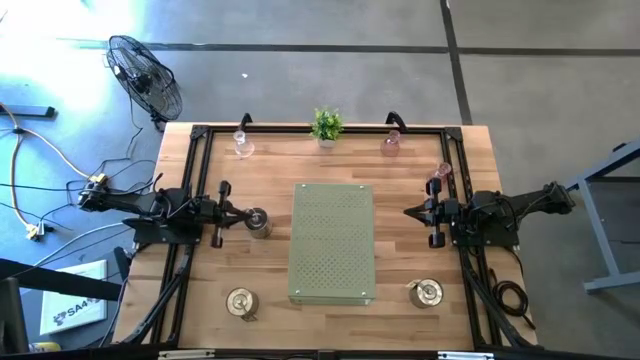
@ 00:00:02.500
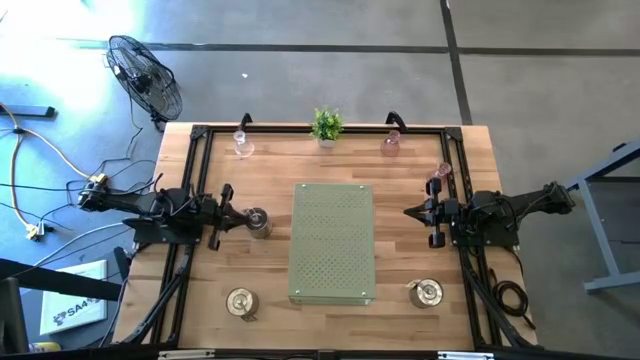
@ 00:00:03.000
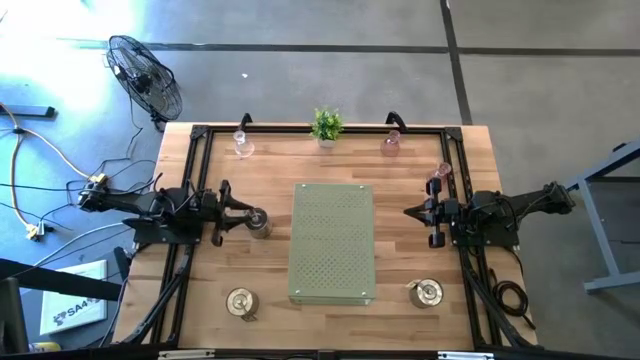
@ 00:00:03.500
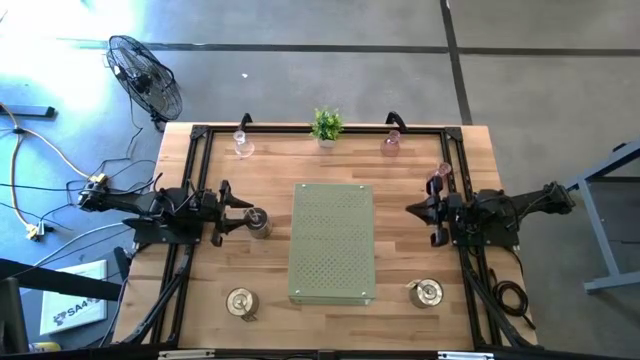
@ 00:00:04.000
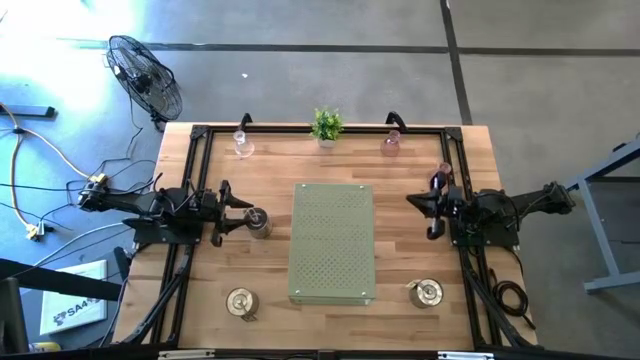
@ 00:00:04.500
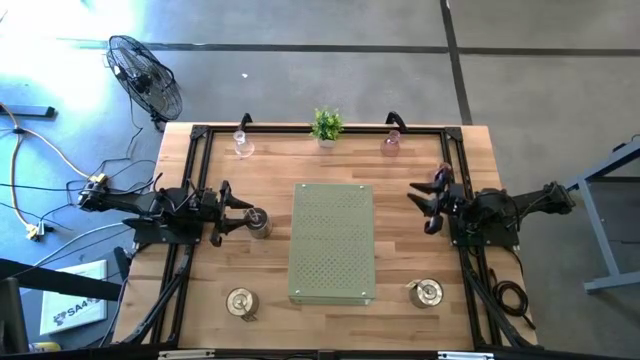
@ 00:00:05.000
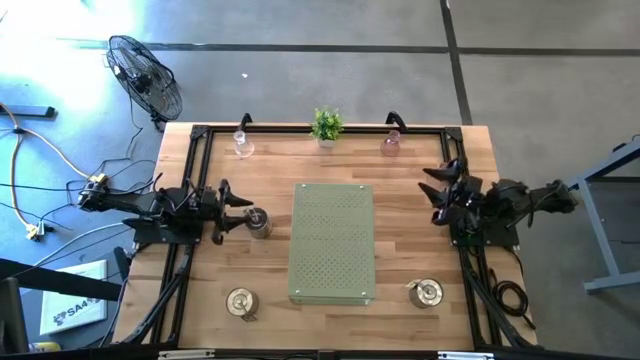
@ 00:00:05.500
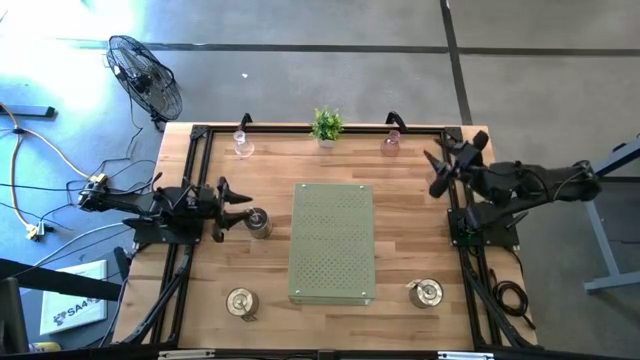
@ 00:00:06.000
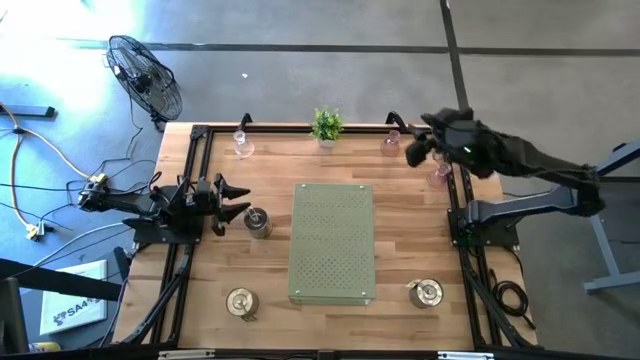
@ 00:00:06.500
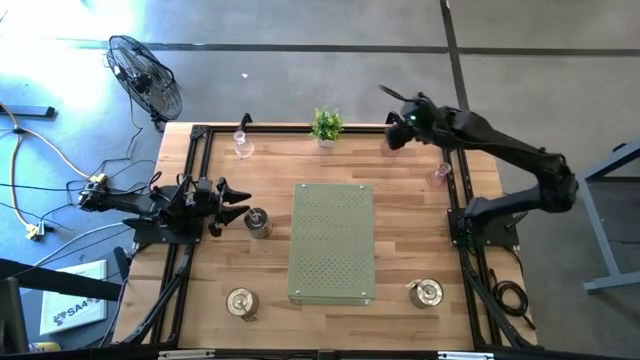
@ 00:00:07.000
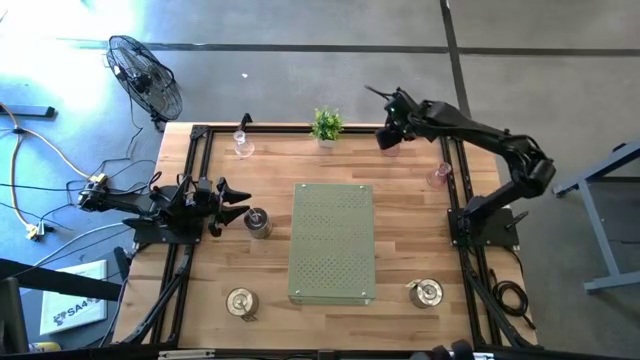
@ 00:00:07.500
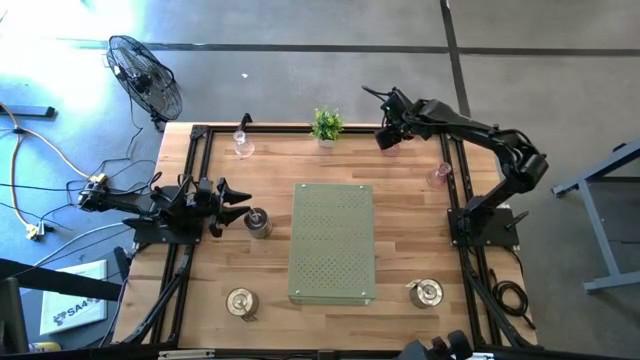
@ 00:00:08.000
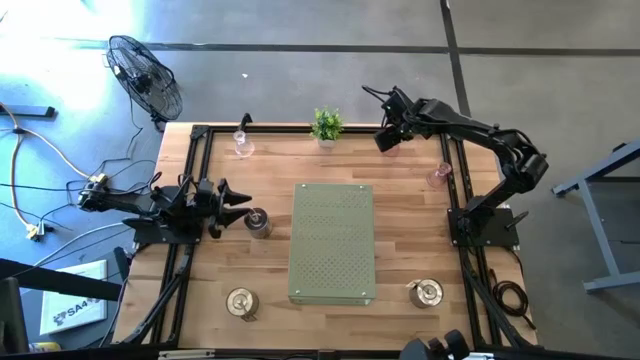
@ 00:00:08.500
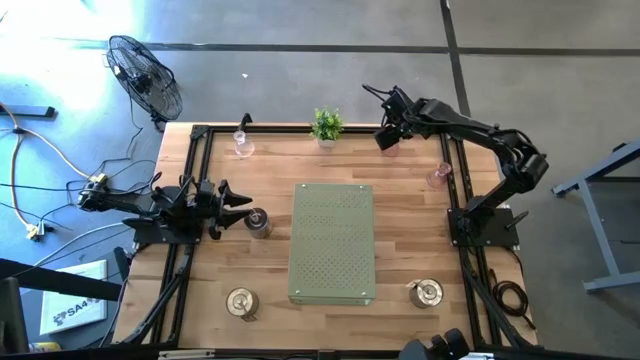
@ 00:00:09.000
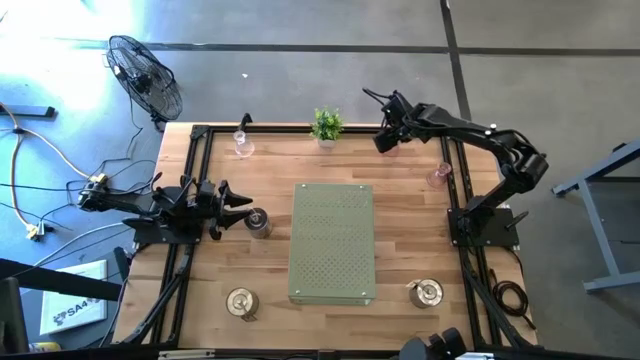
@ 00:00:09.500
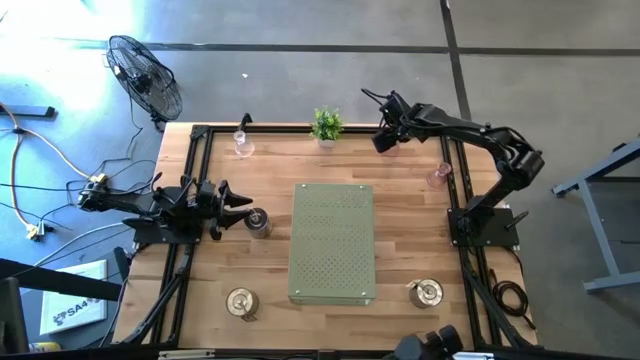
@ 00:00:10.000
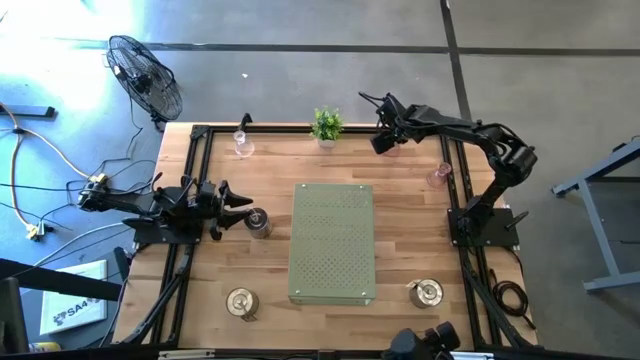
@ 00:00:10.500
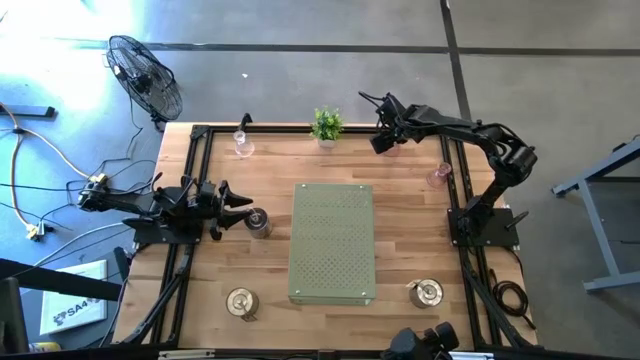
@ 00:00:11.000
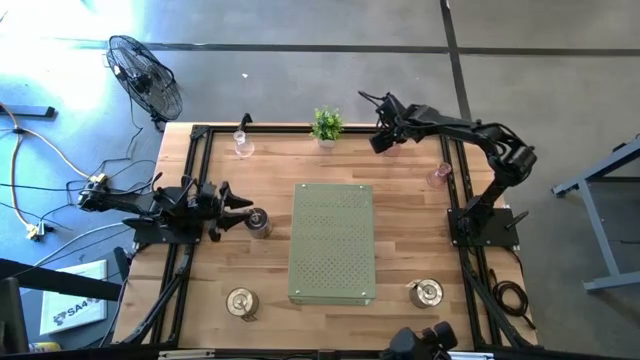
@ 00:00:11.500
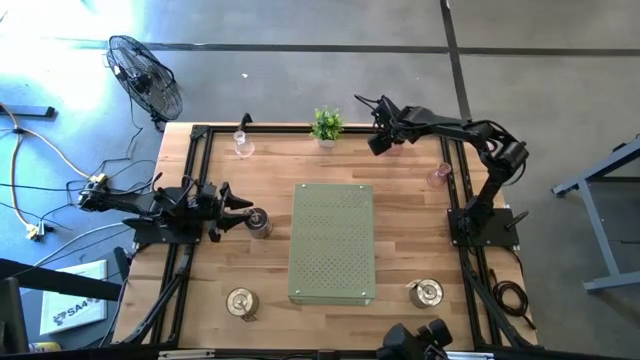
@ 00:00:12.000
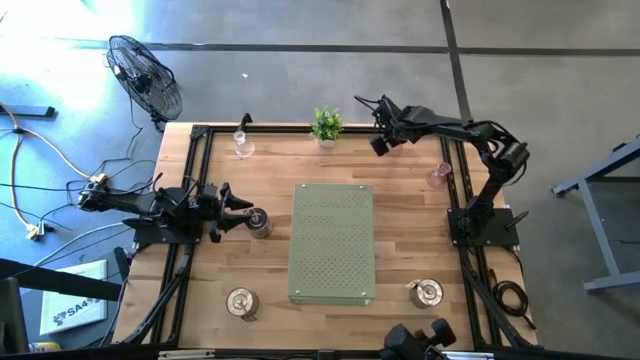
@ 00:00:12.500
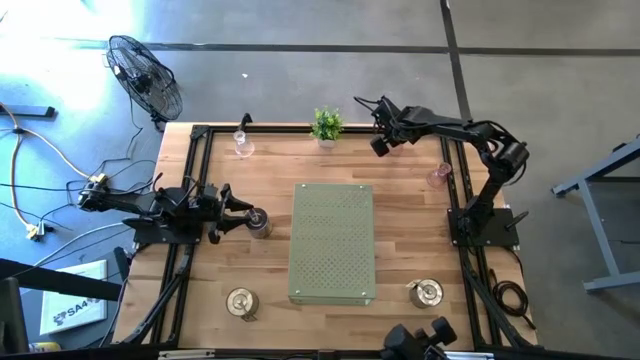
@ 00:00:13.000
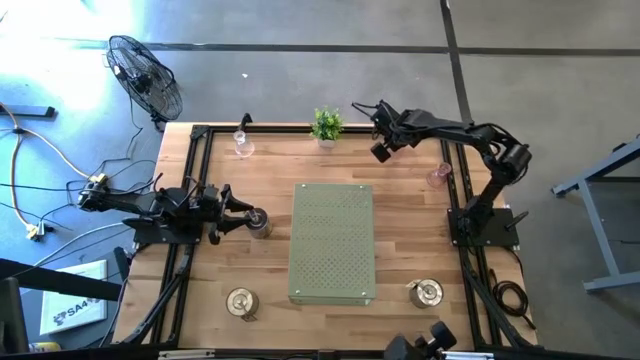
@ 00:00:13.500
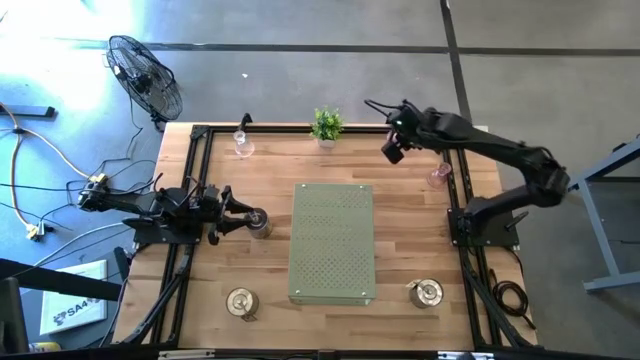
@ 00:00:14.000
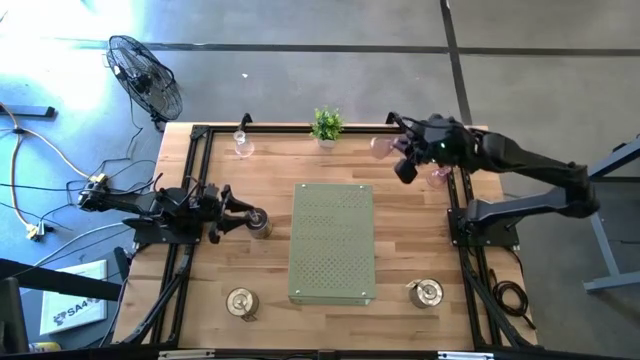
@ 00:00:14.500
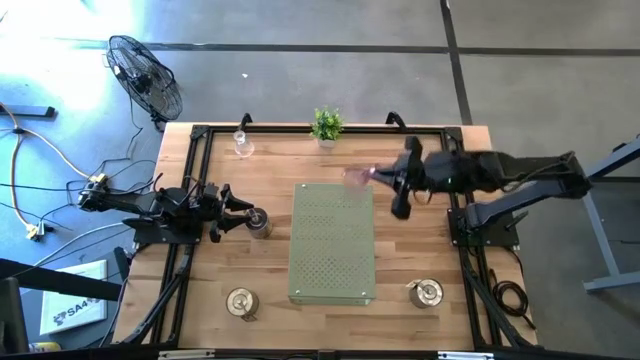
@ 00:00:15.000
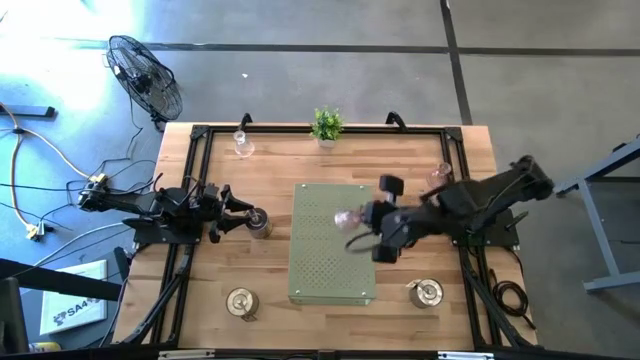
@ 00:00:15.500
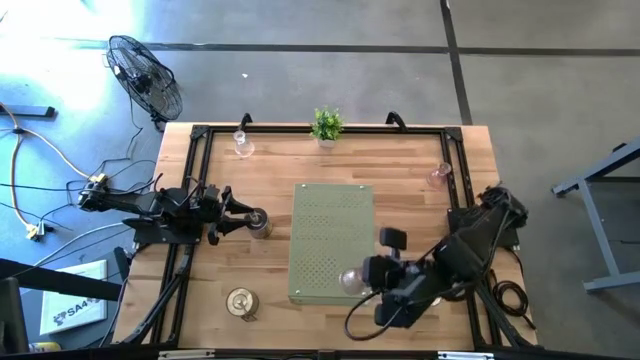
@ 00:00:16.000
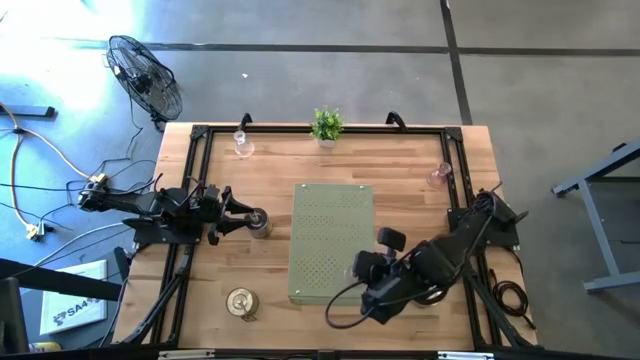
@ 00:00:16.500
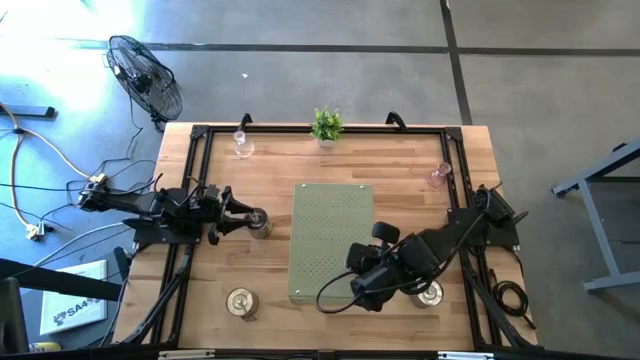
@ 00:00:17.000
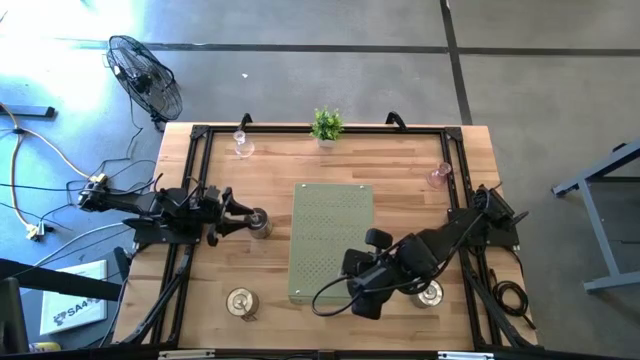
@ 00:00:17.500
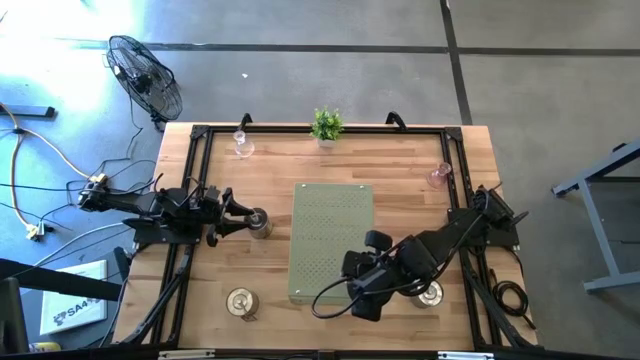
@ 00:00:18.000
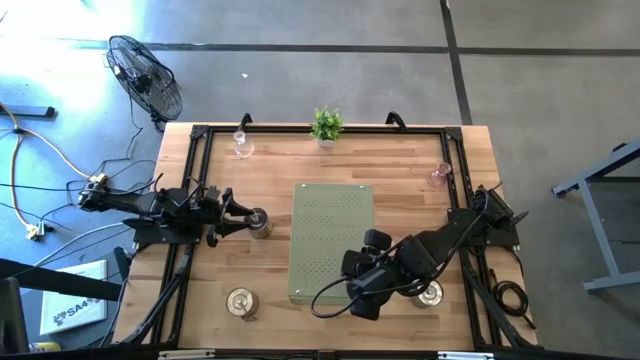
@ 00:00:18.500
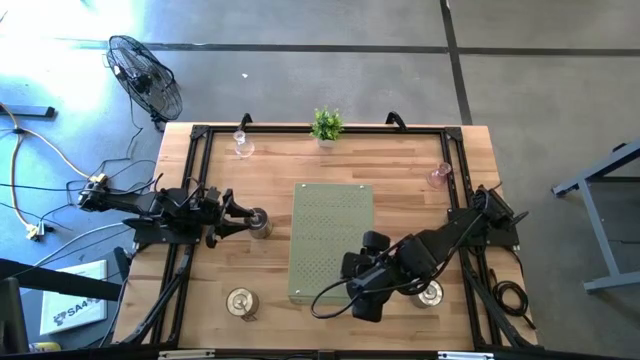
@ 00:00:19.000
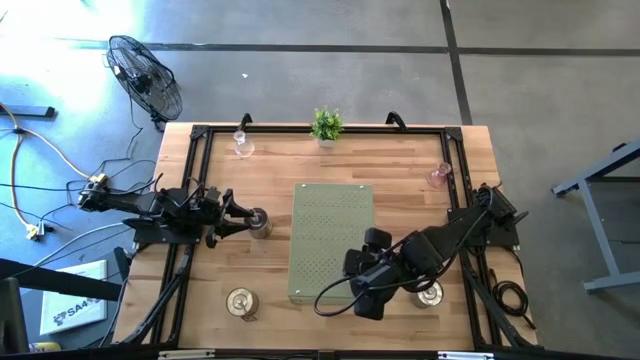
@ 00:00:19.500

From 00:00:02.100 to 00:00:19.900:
Task: Pick & Place candle stick holders
Put the top purple candle holder on the shelf
